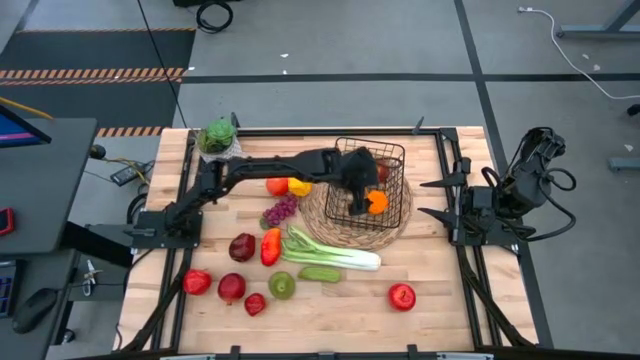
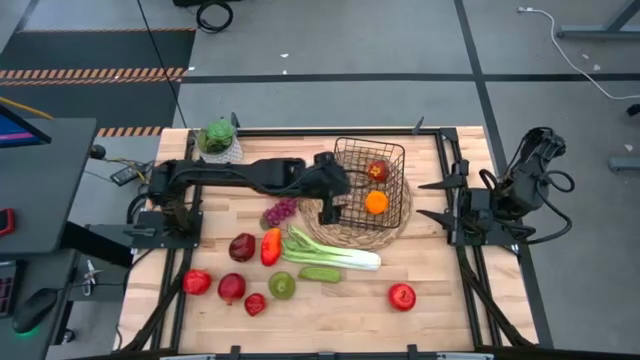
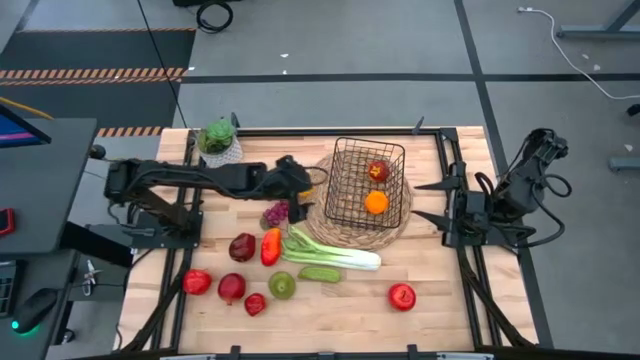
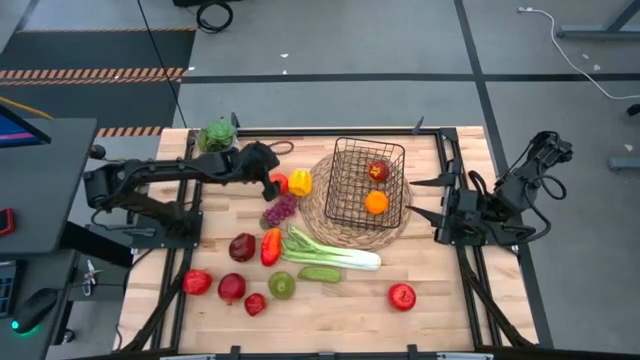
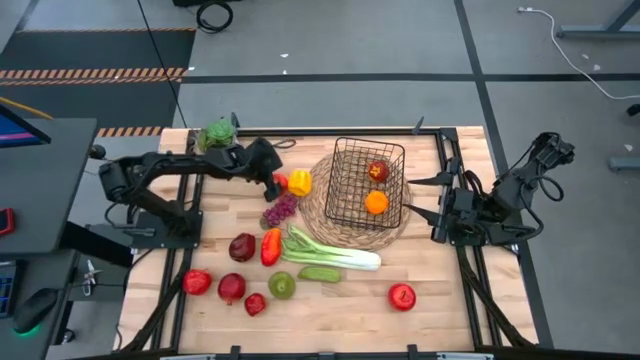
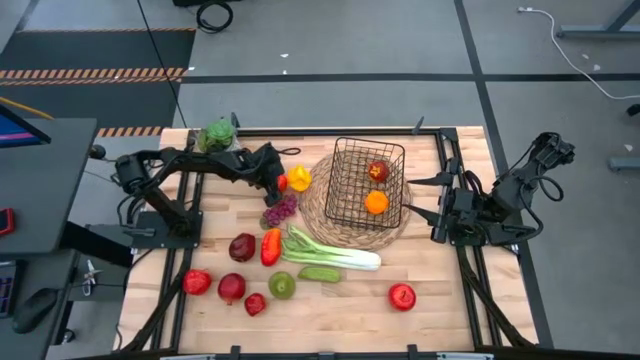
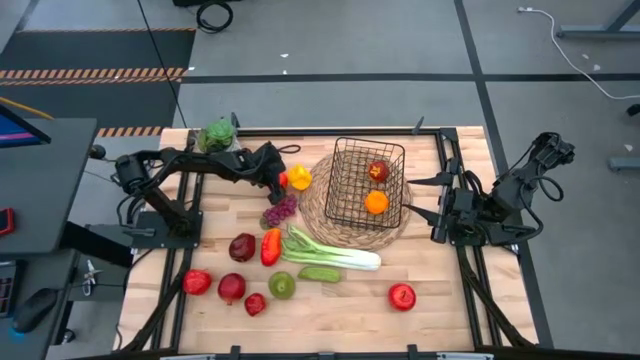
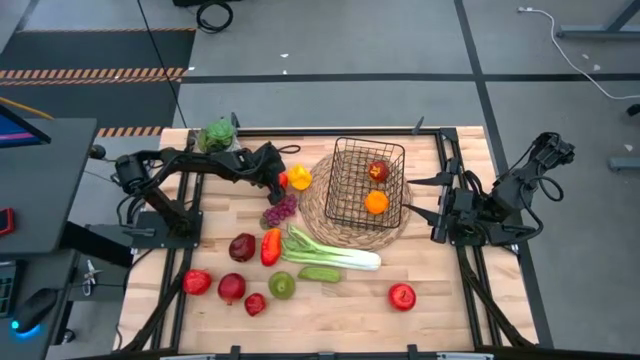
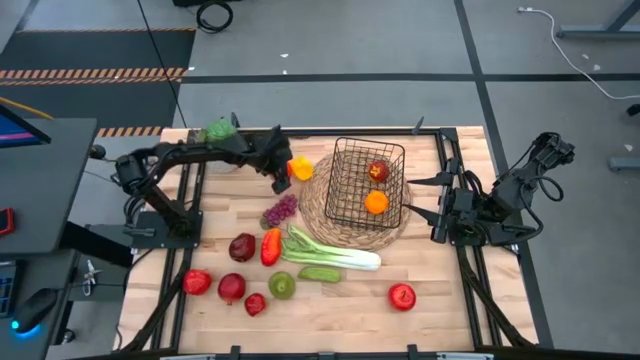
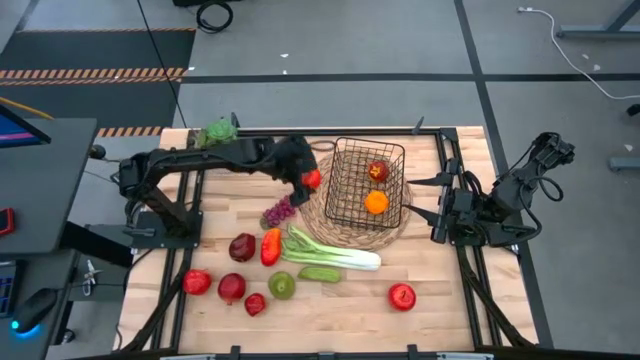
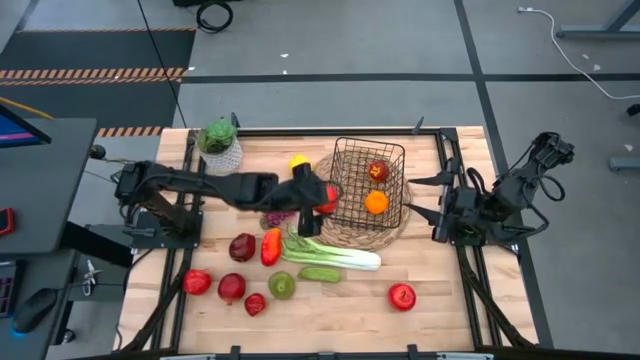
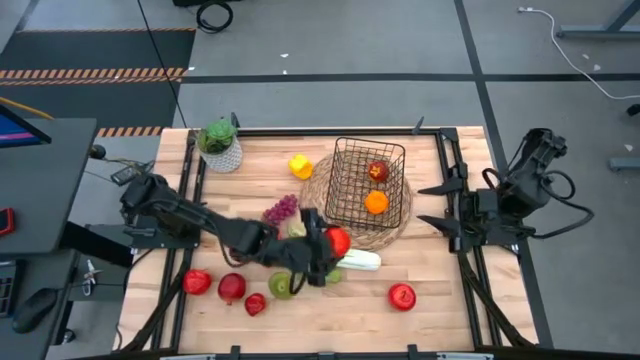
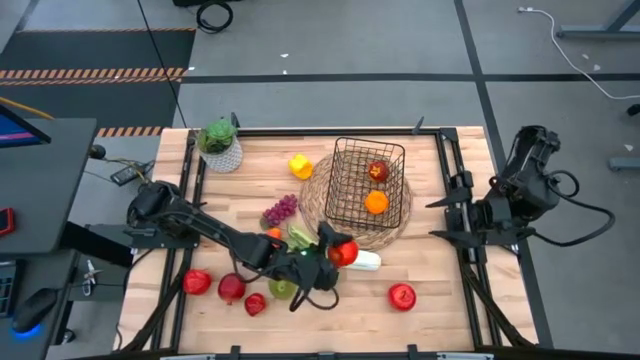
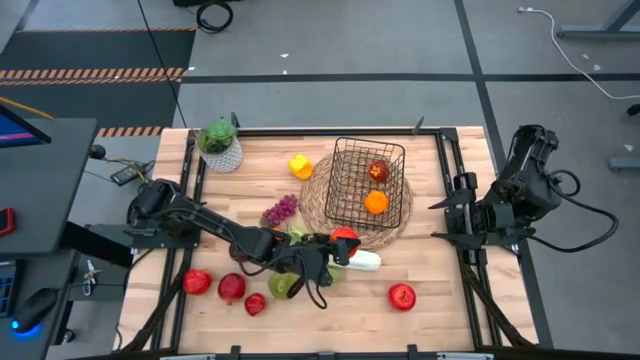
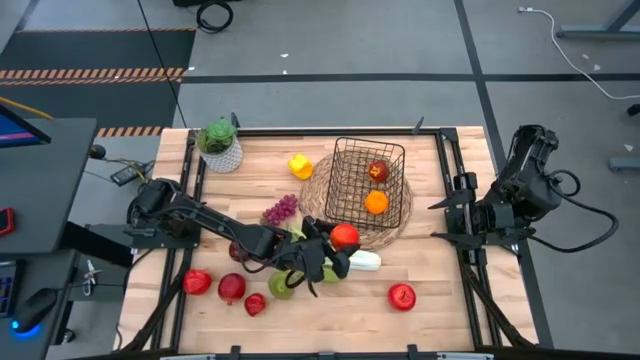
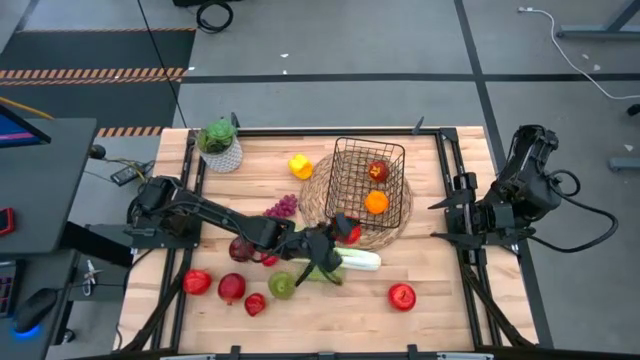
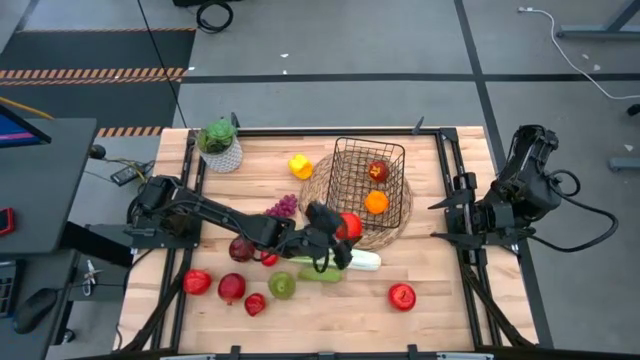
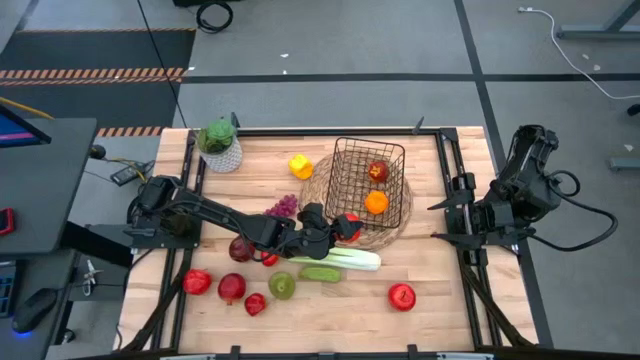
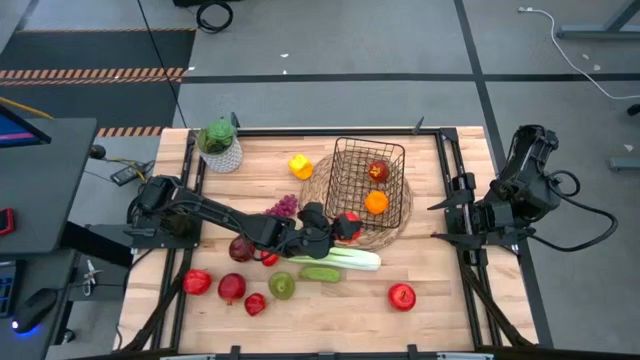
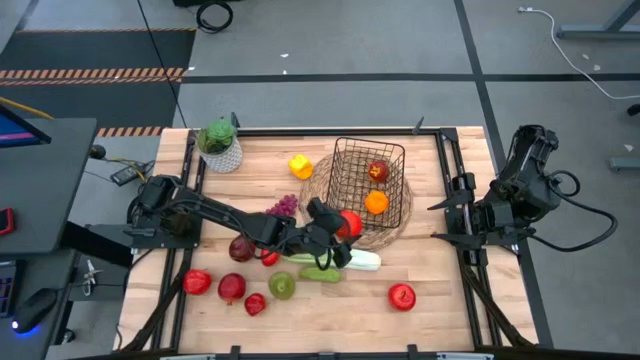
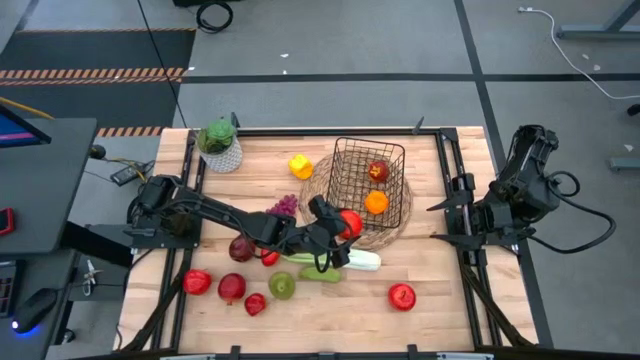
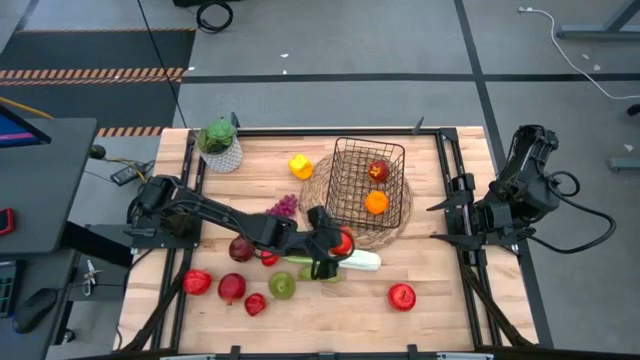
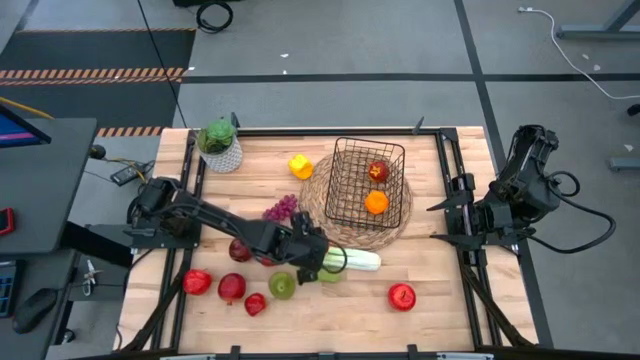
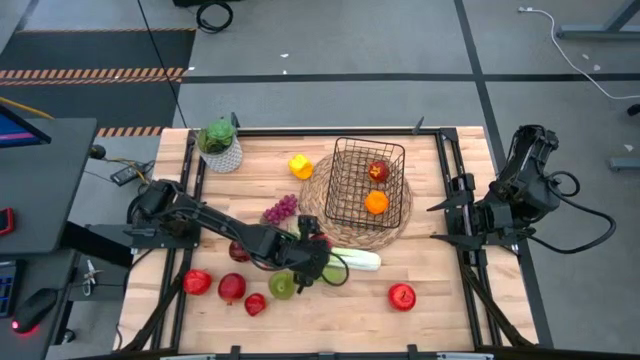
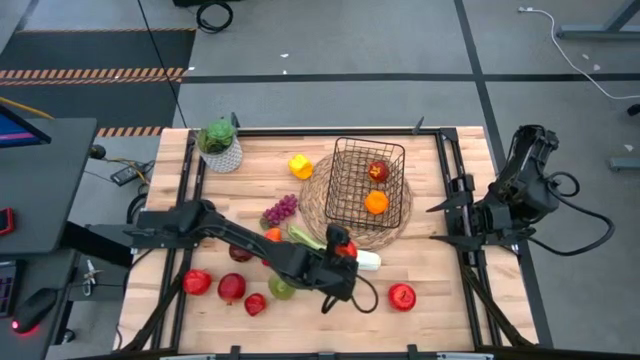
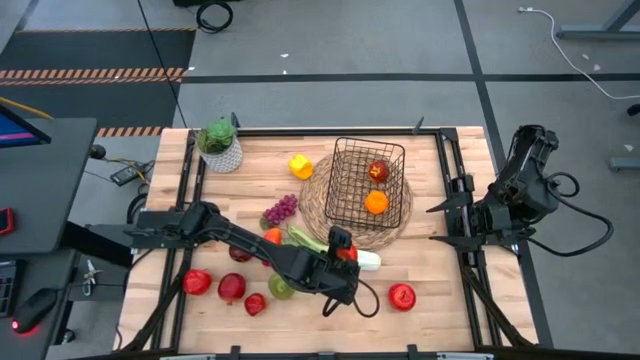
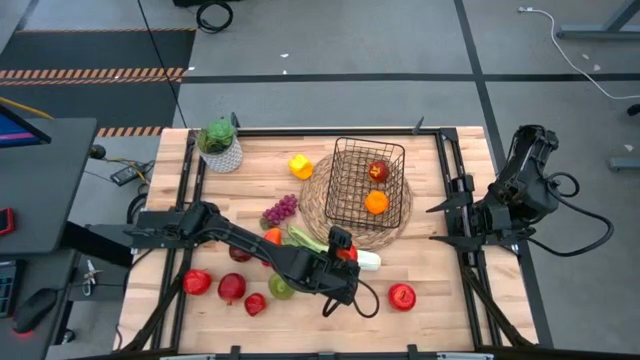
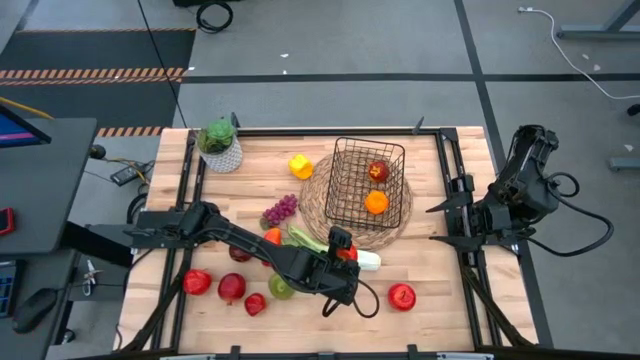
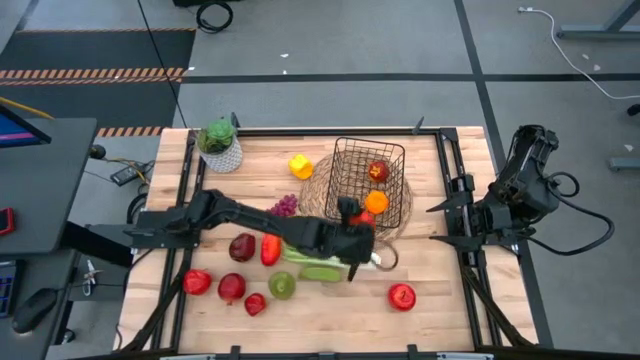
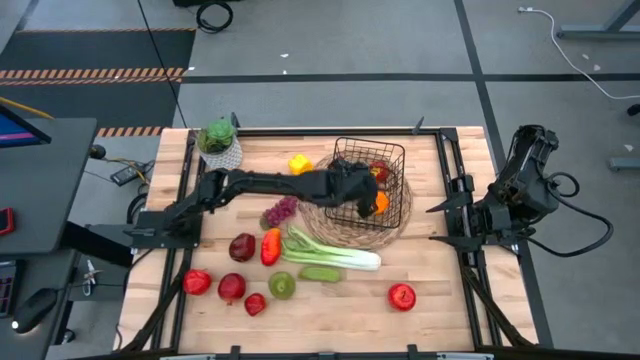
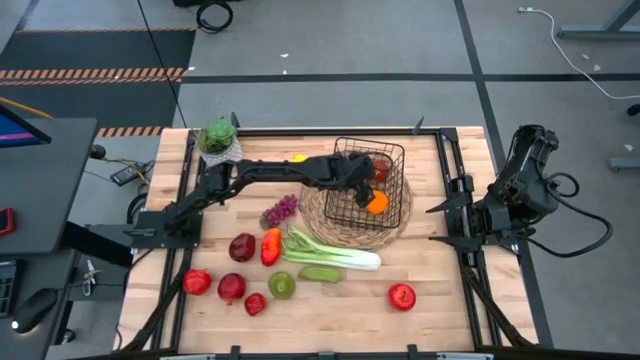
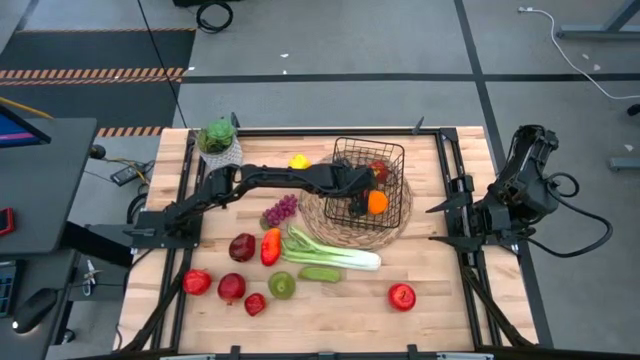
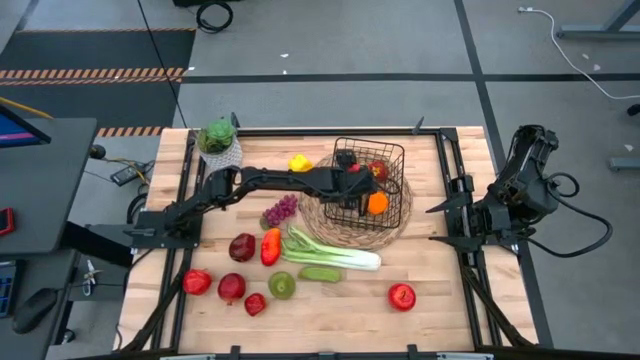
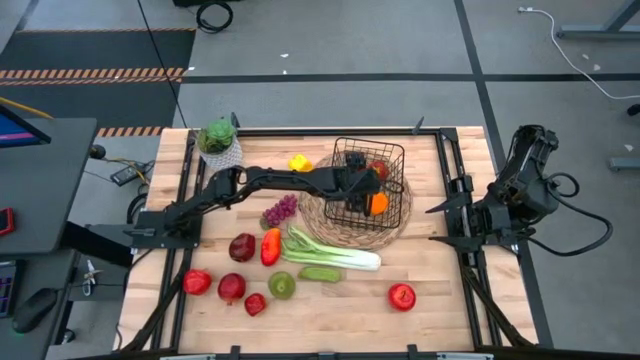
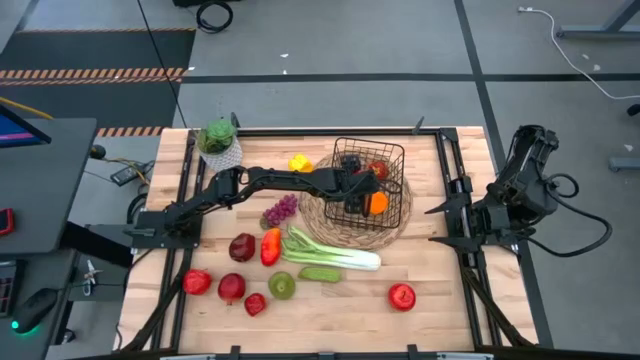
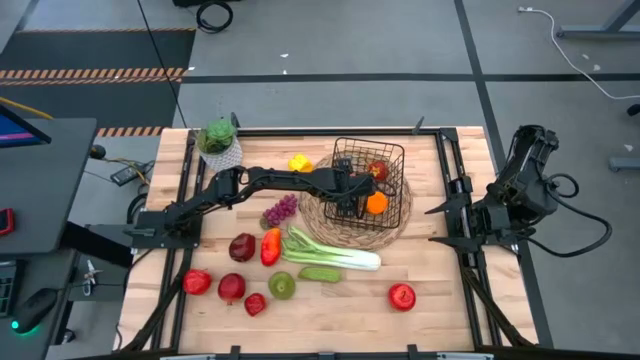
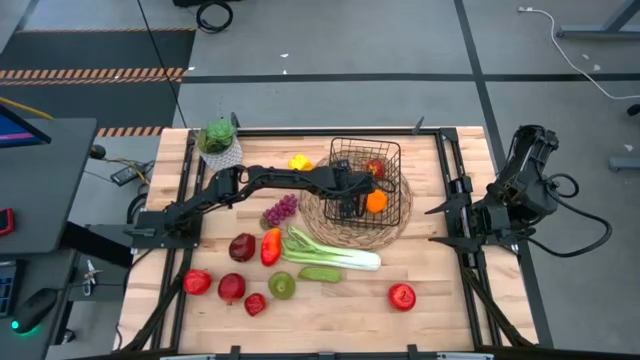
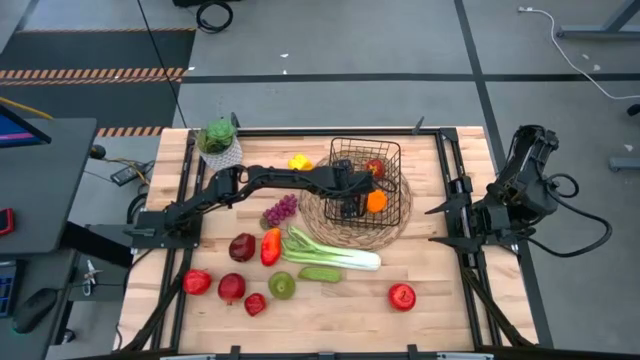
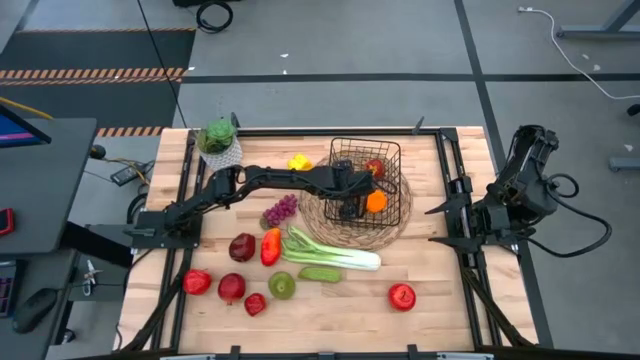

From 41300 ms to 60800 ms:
Task: Build produce basket
Put the apple into the wire basket
